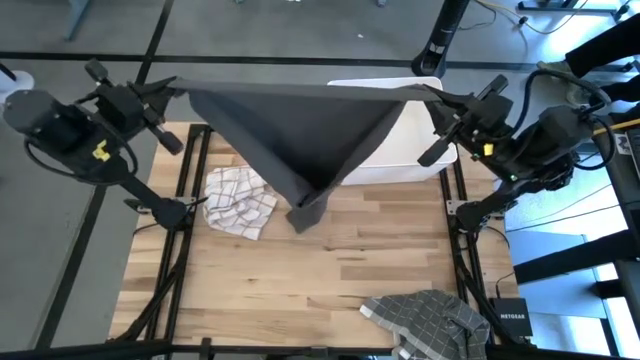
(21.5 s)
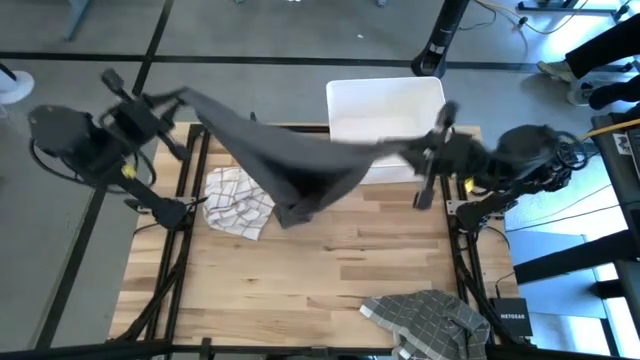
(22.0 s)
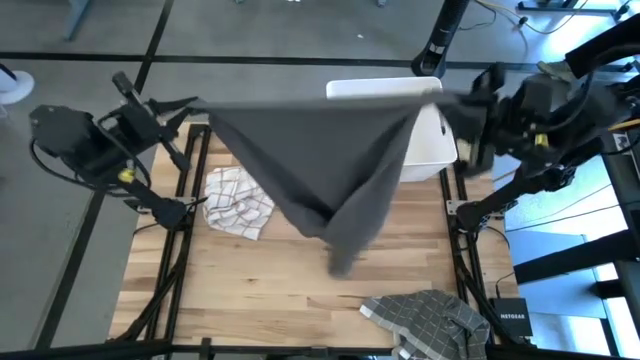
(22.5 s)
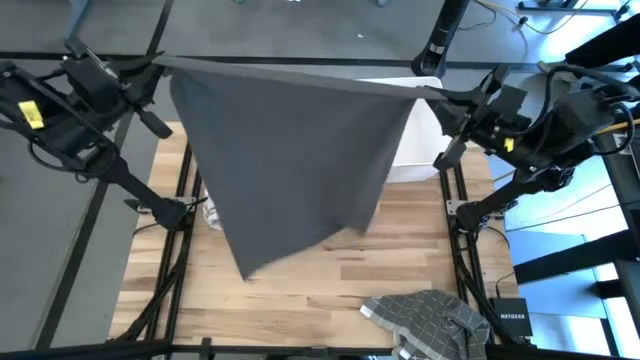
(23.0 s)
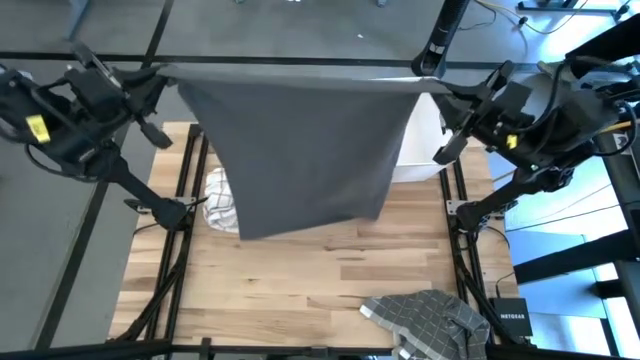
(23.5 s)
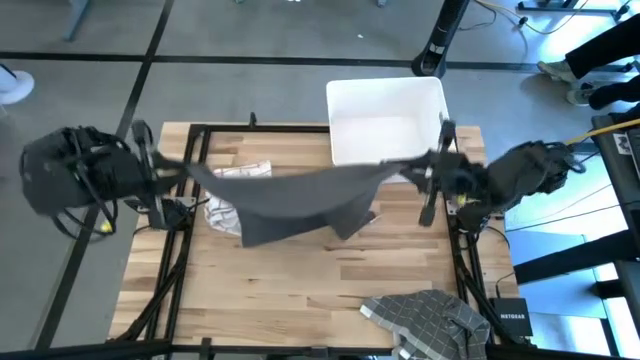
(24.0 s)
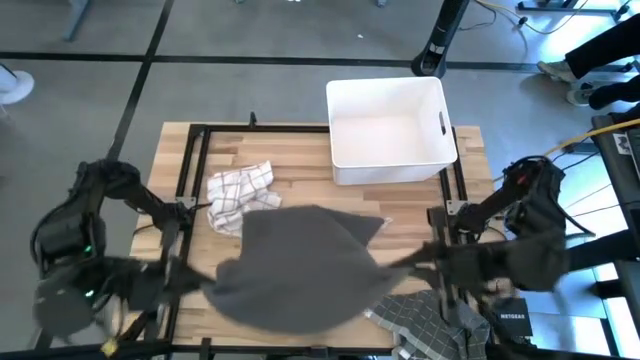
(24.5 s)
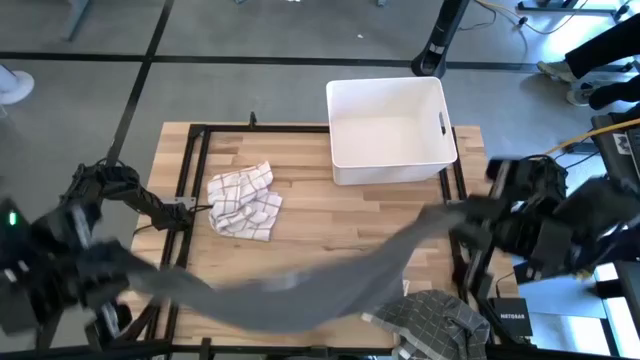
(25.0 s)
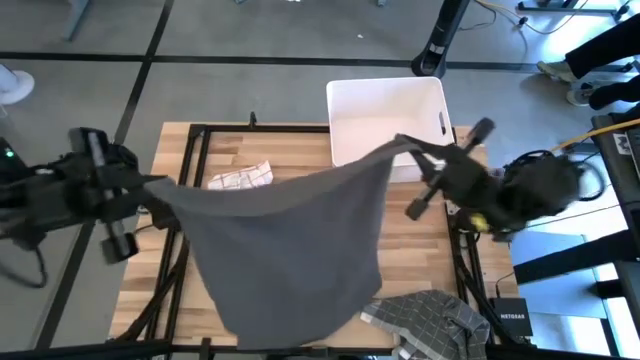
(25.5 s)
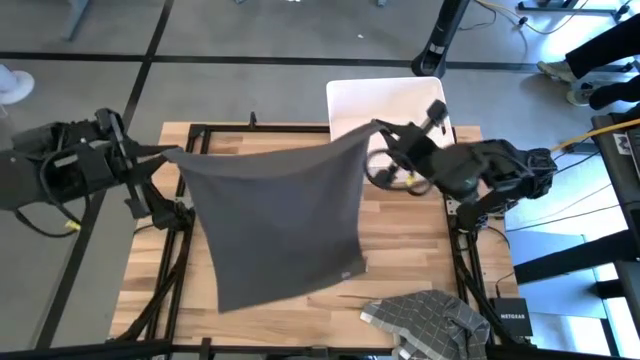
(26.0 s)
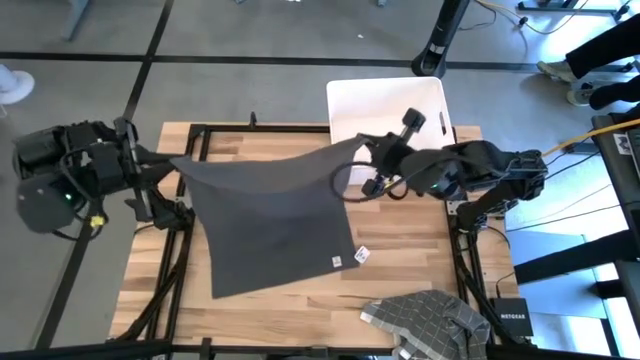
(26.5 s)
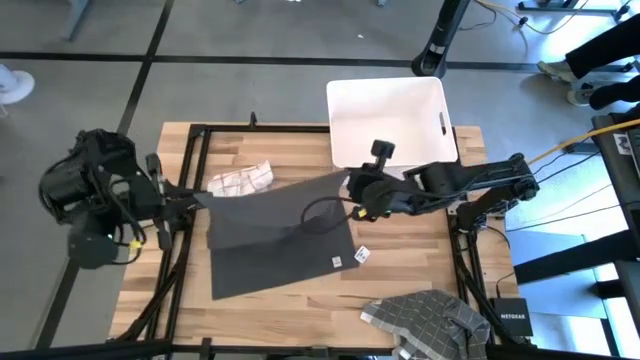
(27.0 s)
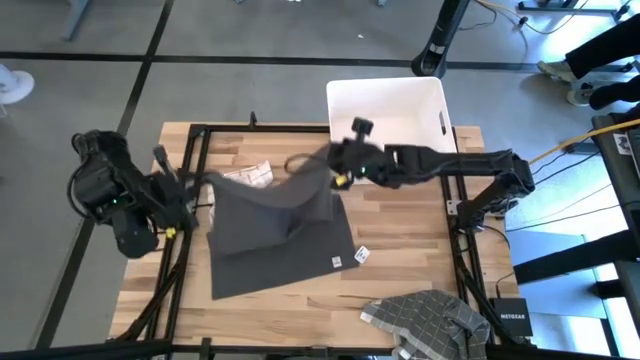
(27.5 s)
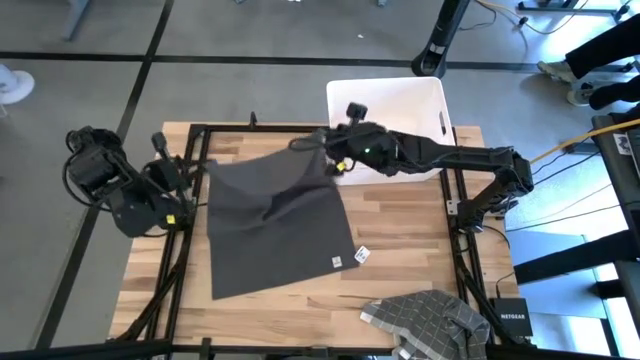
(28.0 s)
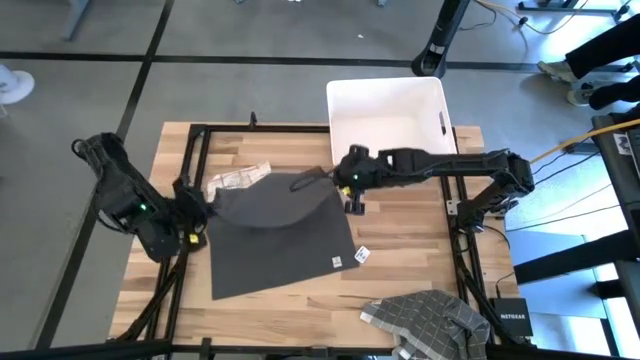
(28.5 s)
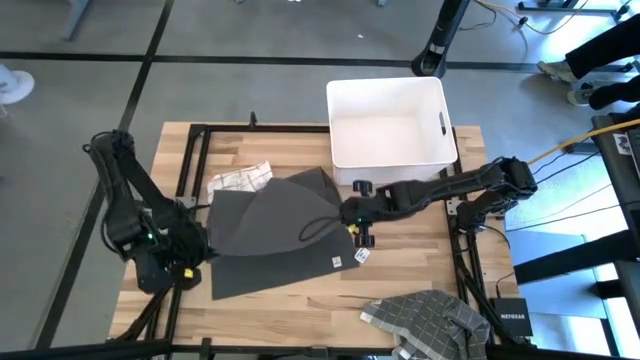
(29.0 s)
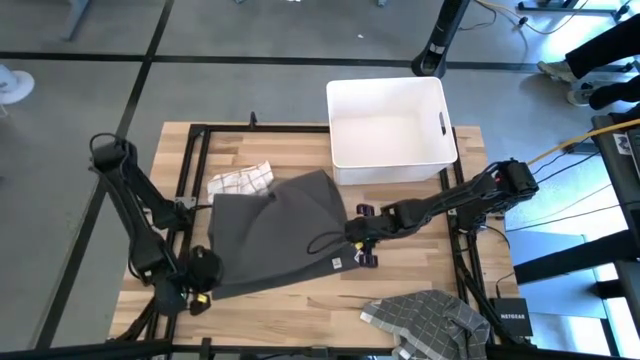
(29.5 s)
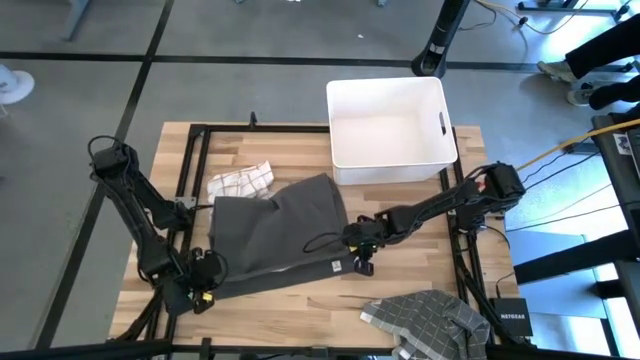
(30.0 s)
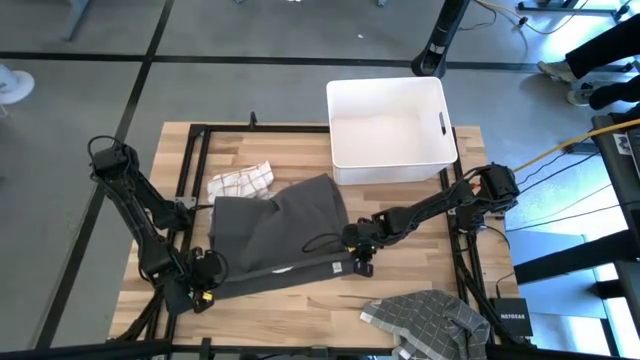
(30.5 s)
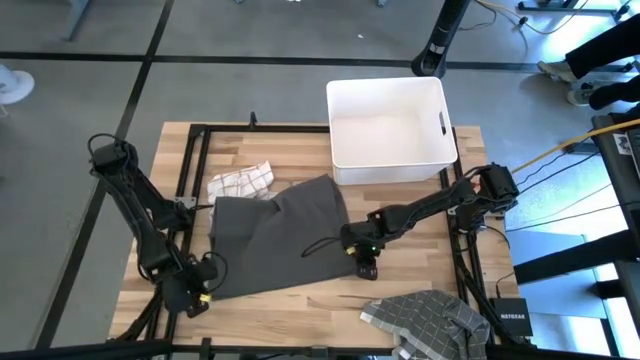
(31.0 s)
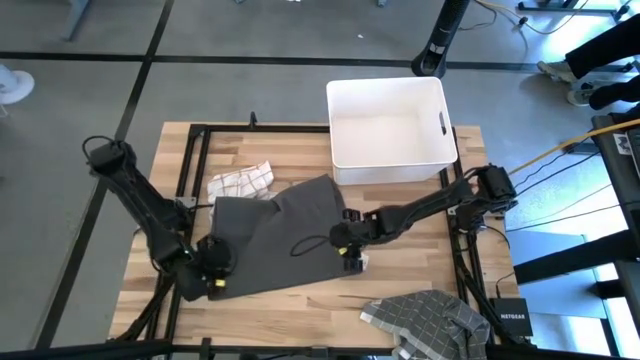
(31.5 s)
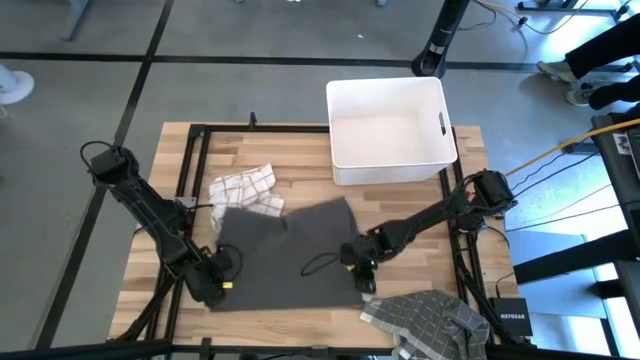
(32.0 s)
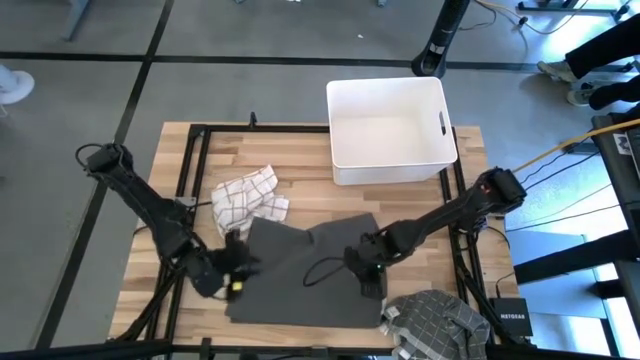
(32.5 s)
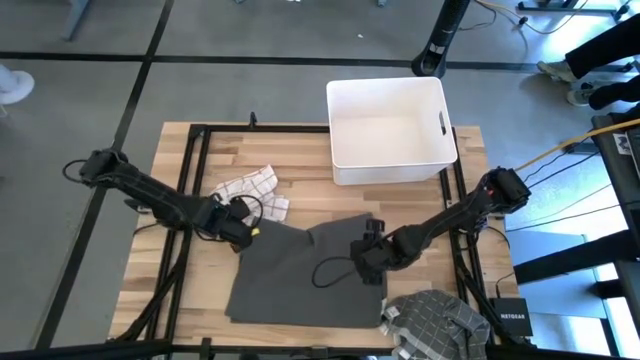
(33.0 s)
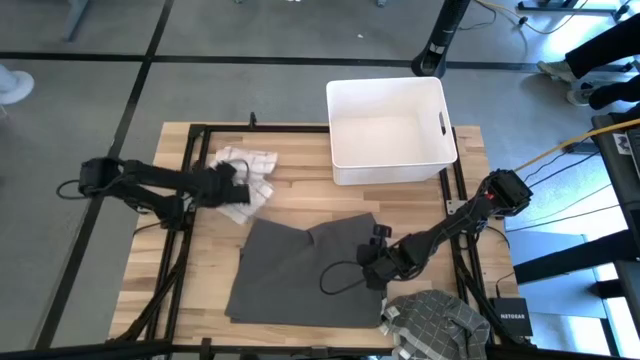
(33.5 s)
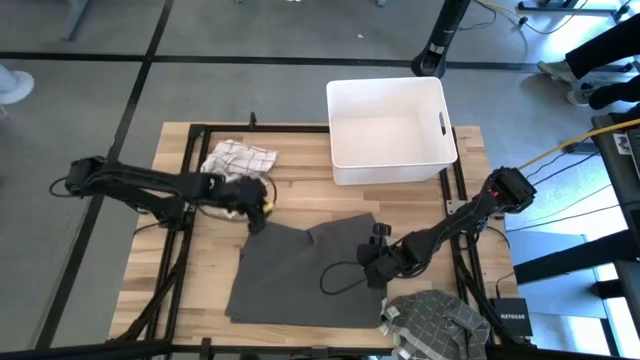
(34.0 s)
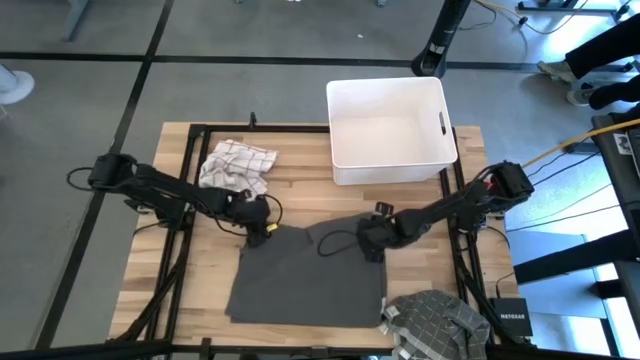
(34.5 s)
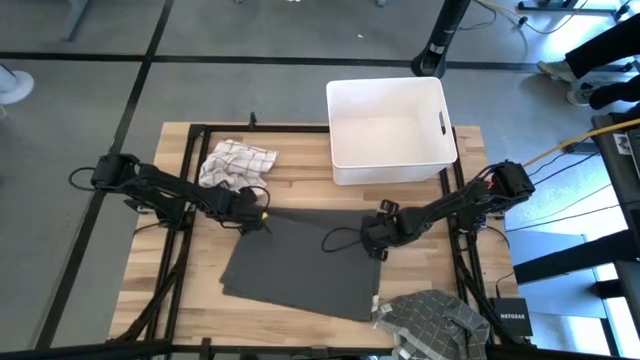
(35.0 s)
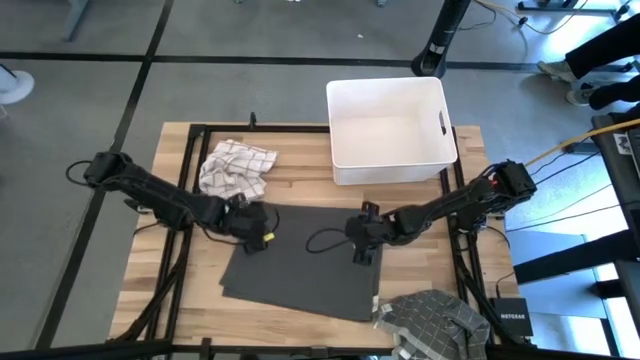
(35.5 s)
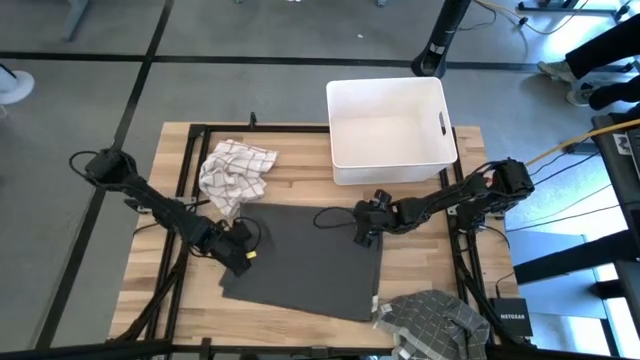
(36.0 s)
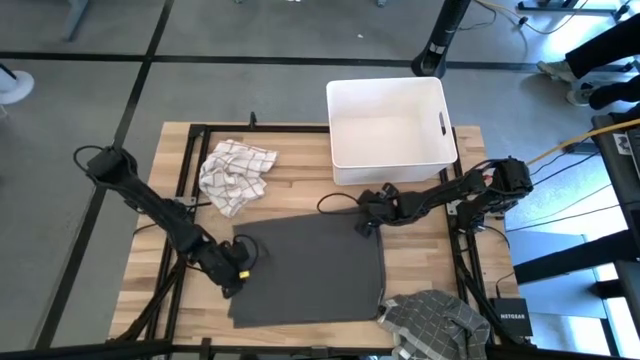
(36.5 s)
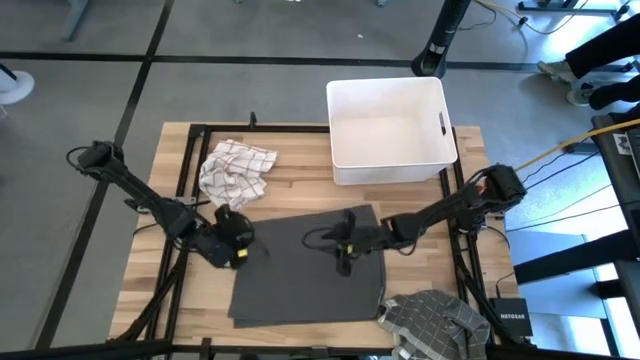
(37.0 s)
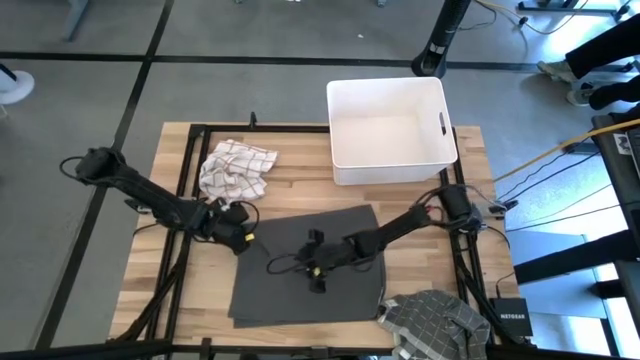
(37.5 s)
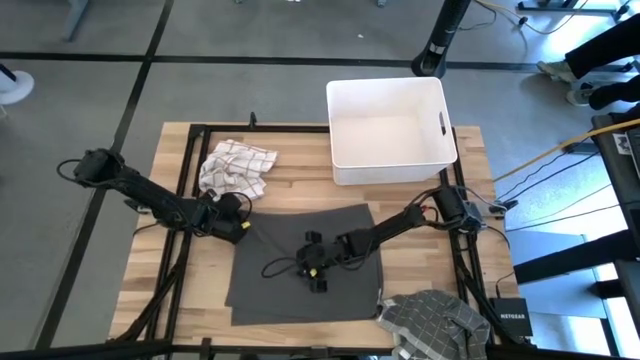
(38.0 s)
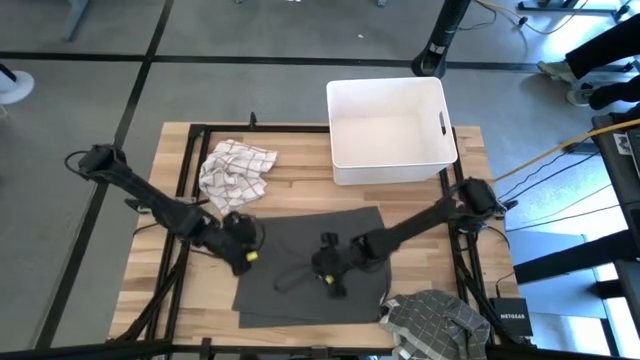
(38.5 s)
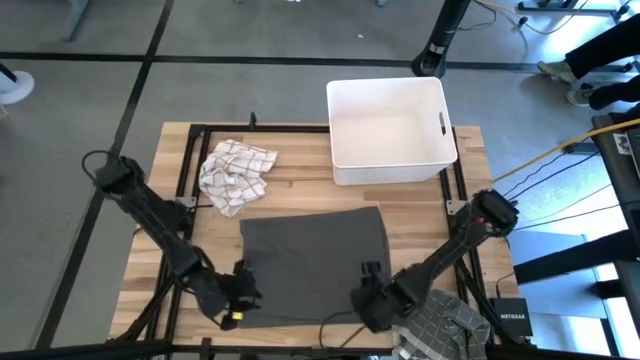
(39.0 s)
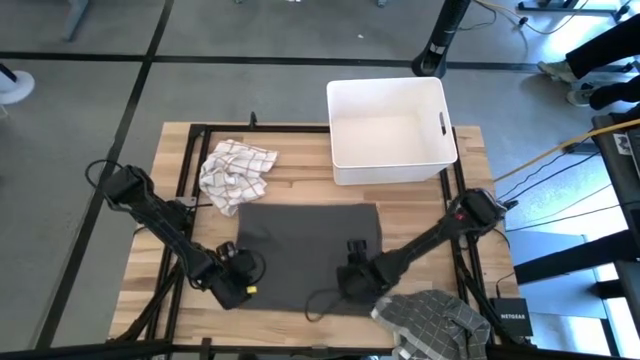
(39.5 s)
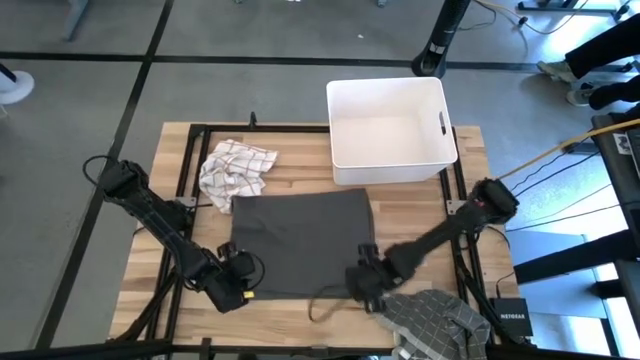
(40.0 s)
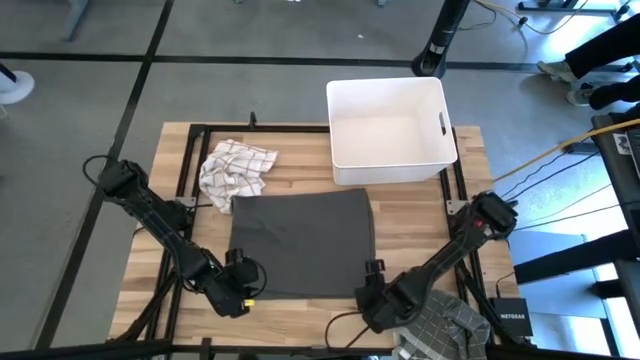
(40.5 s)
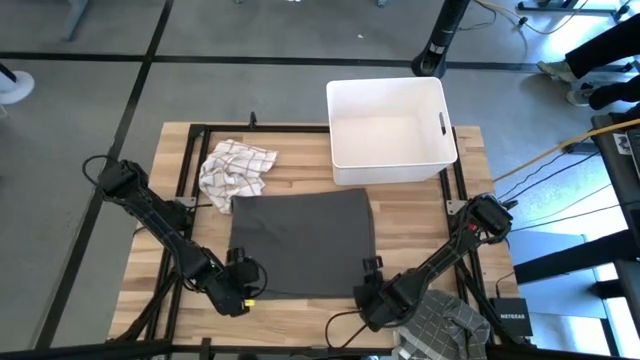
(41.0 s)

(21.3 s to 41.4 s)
Task: Fold towel
Fold the gray towel
